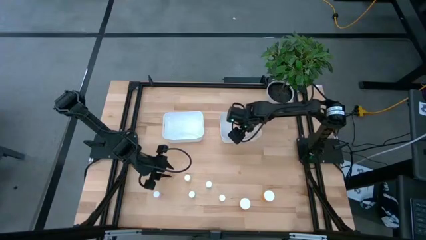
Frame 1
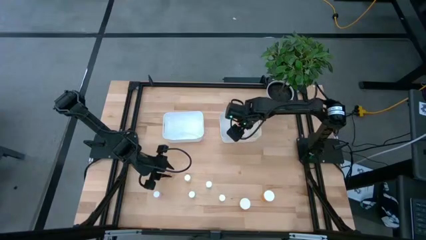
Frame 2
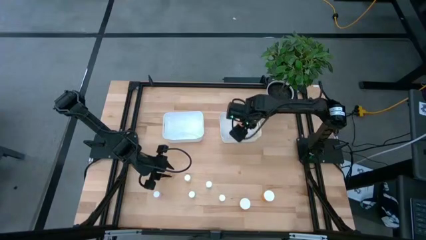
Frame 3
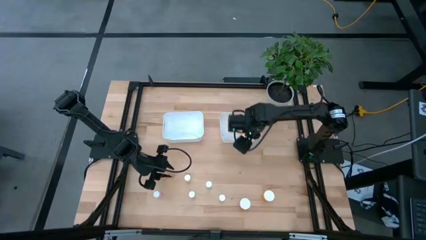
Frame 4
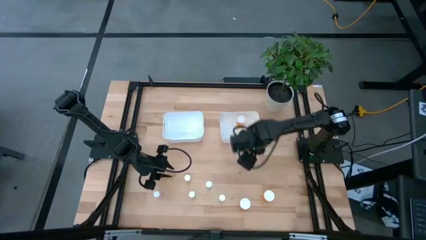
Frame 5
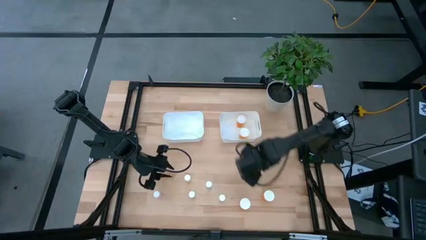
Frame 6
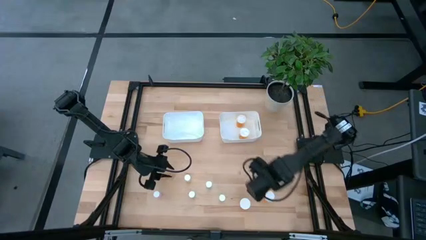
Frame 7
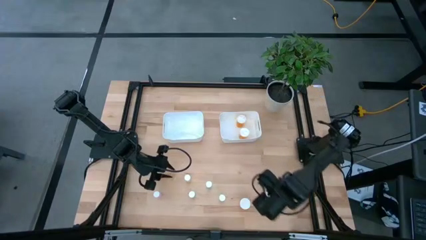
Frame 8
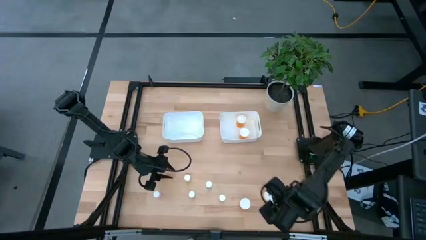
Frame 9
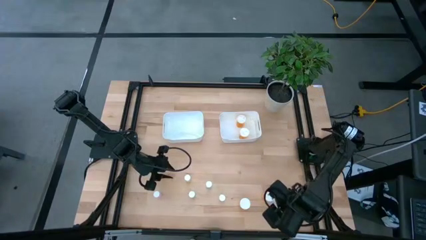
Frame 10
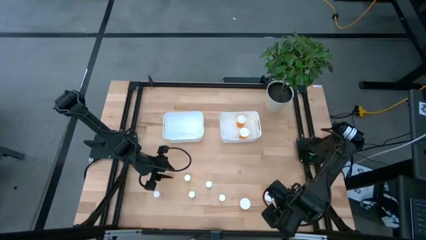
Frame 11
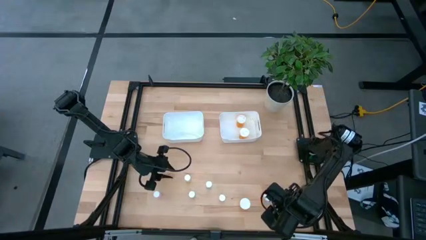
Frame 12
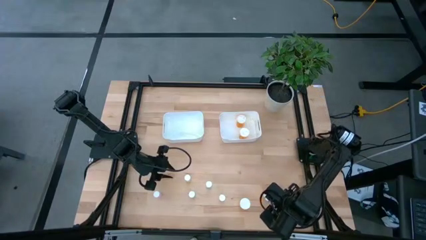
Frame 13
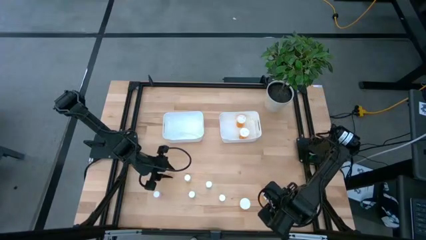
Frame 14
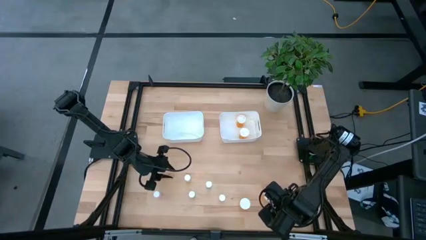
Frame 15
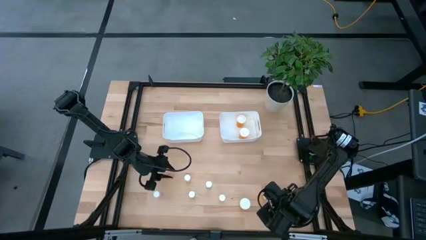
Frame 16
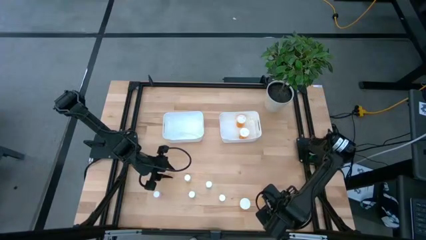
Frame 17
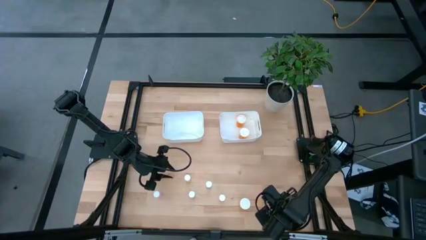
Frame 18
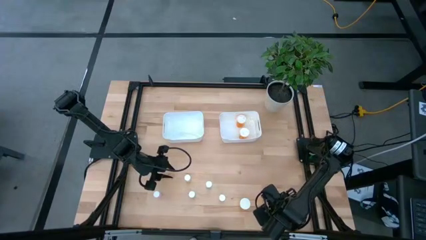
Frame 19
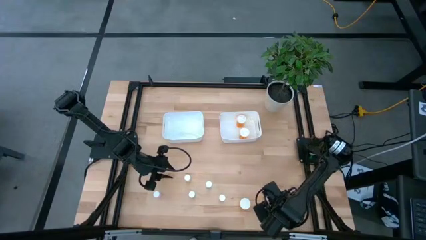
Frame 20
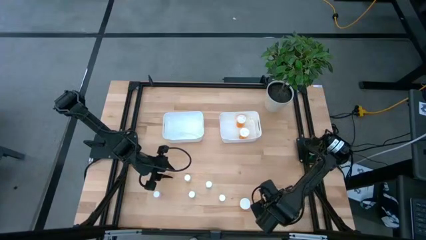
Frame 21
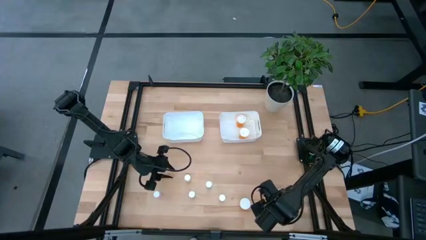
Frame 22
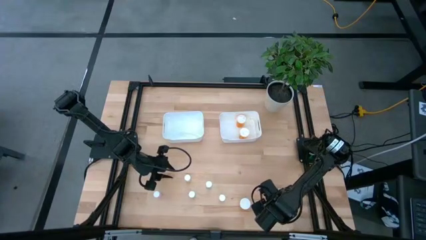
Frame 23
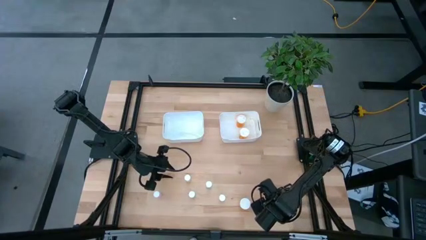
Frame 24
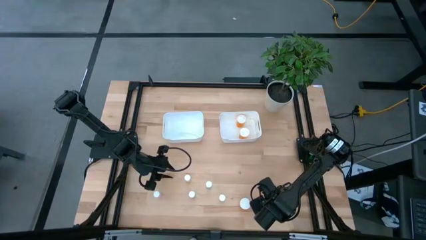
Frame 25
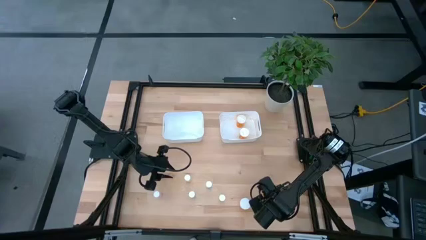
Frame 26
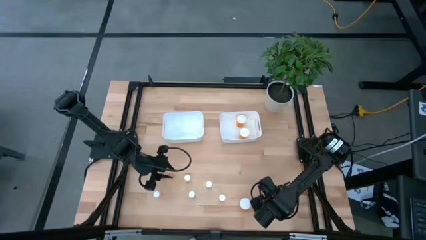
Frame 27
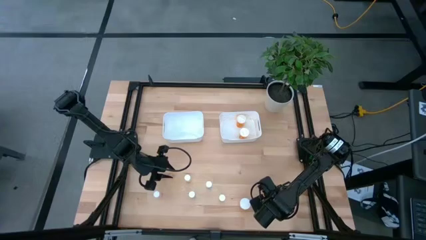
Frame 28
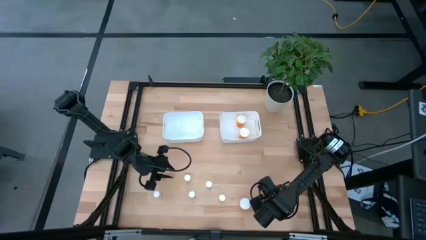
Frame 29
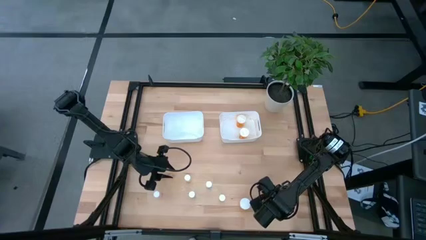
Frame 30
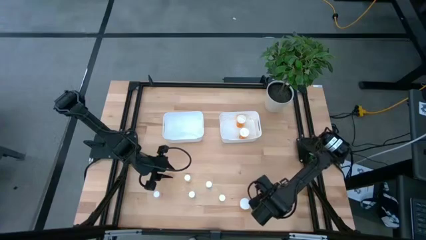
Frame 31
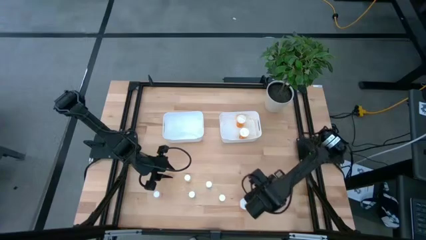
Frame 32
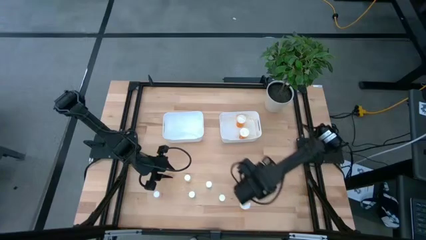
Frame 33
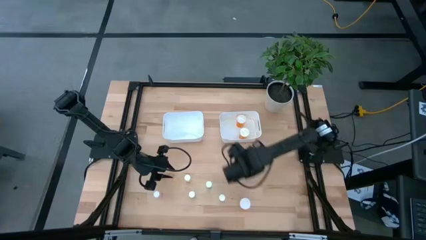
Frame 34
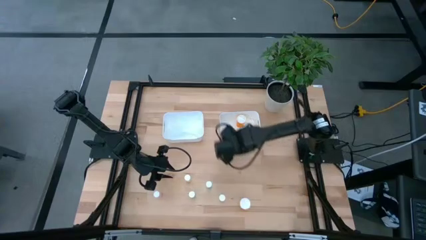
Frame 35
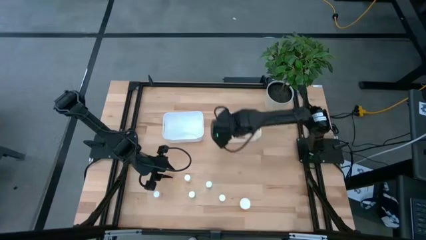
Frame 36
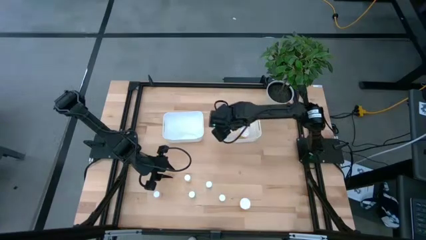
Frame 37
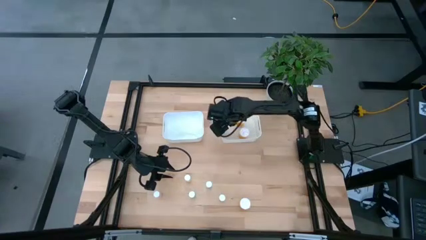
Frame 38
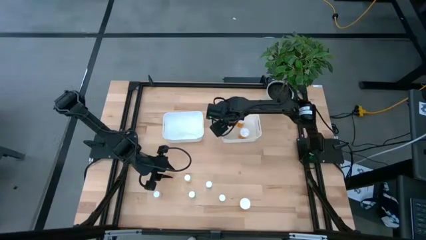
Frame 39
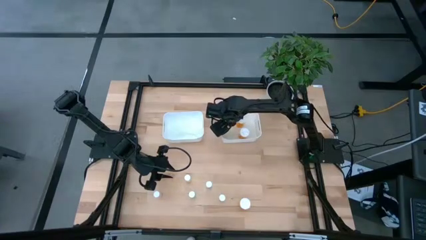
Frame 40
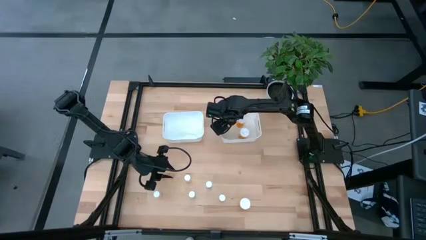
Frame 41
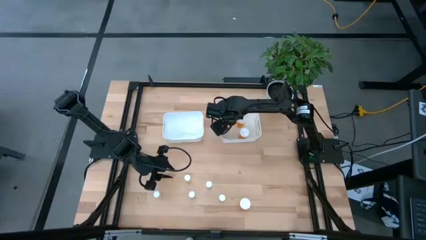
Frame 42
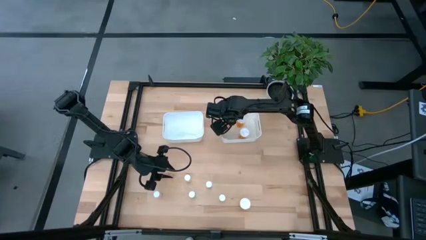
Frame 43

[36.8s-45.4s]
Task: Pick and place medicine bottles into bin by pill shape (circle, oval)
Put the right orange pill bottle into the right white bin

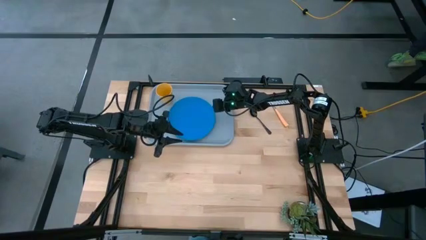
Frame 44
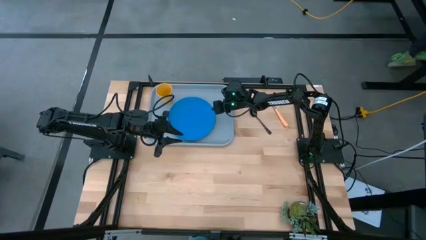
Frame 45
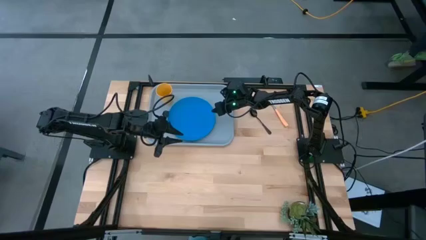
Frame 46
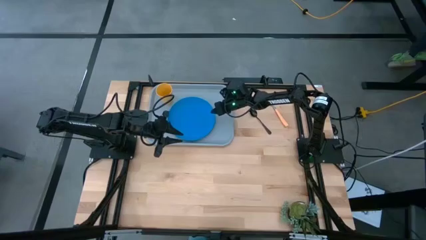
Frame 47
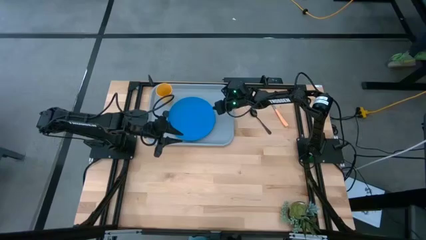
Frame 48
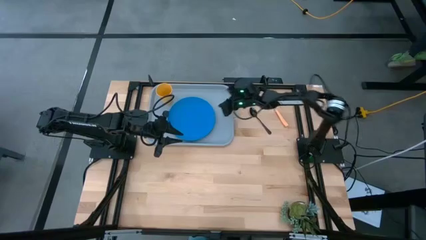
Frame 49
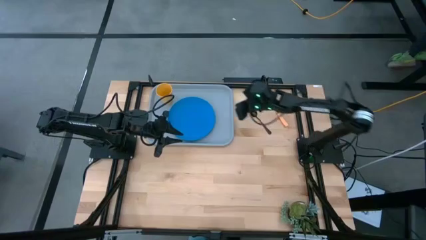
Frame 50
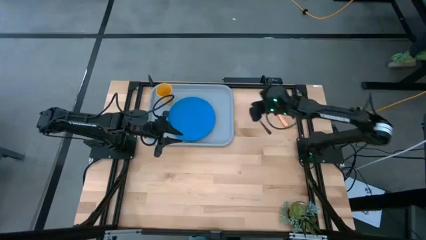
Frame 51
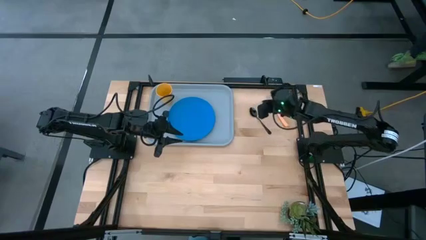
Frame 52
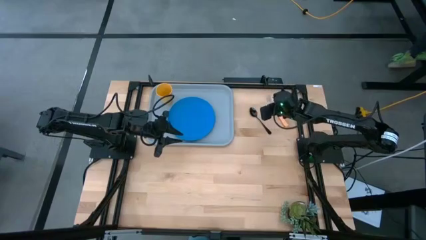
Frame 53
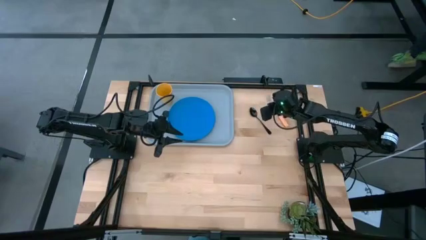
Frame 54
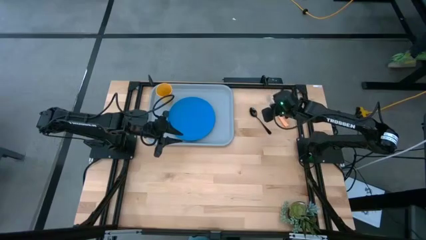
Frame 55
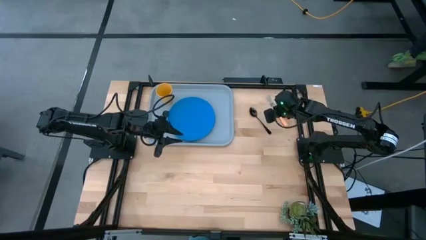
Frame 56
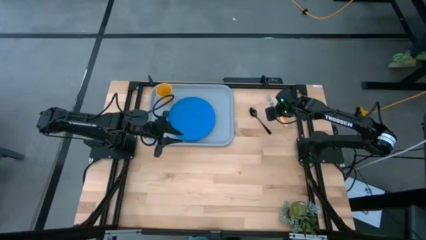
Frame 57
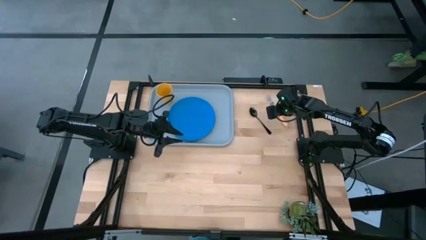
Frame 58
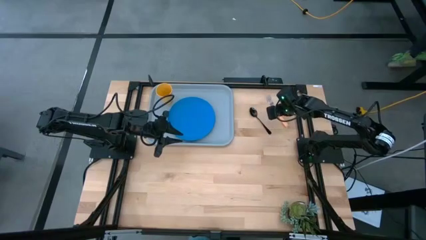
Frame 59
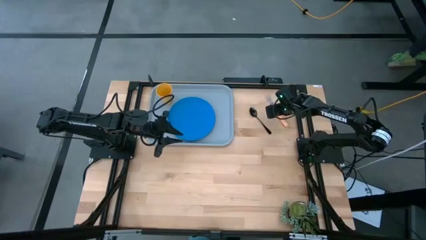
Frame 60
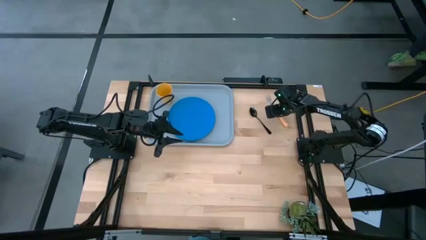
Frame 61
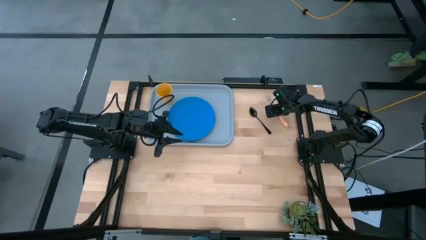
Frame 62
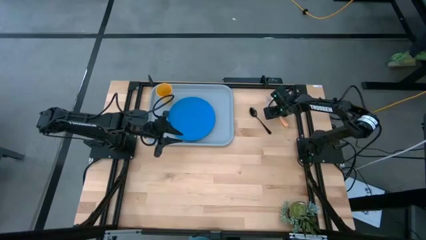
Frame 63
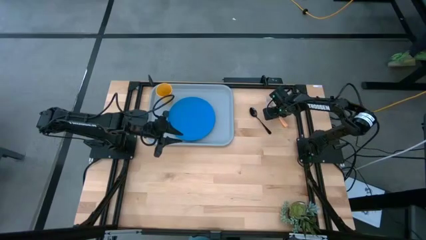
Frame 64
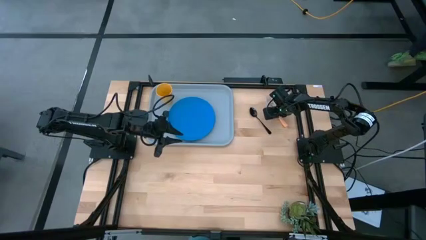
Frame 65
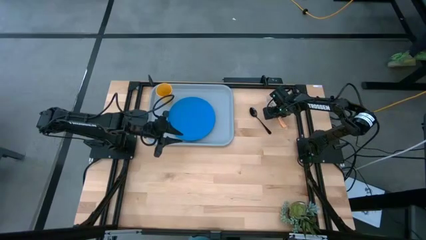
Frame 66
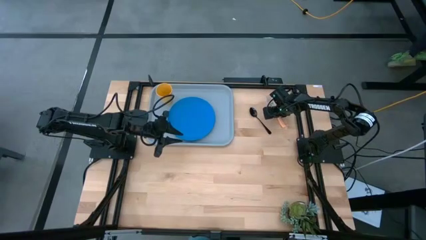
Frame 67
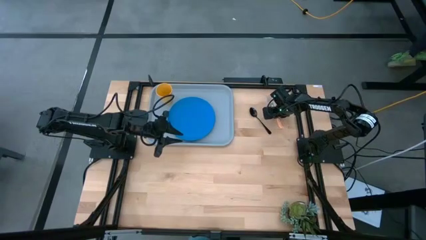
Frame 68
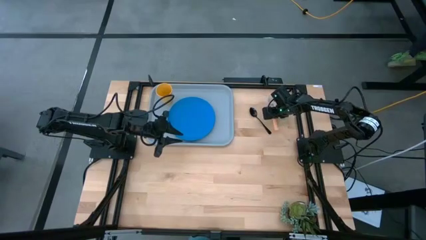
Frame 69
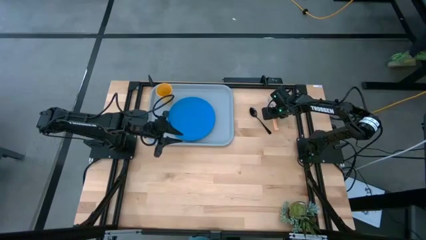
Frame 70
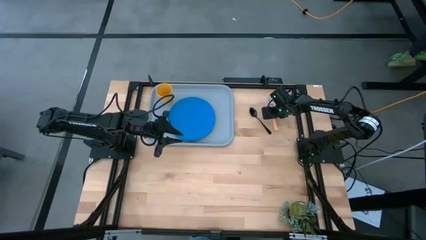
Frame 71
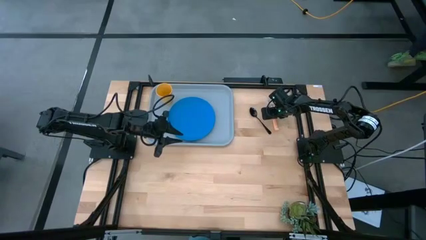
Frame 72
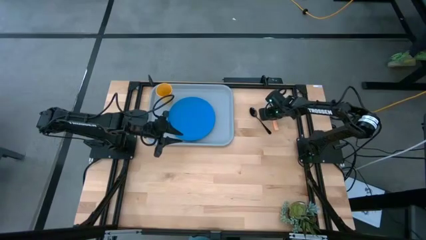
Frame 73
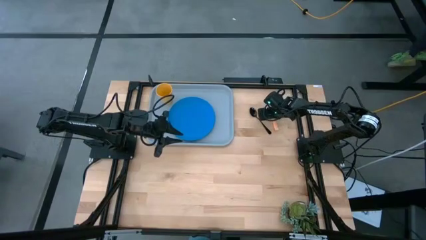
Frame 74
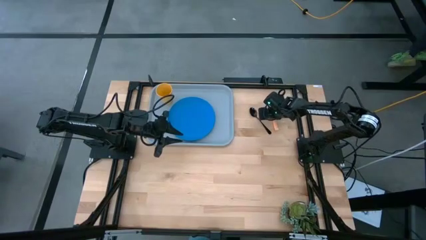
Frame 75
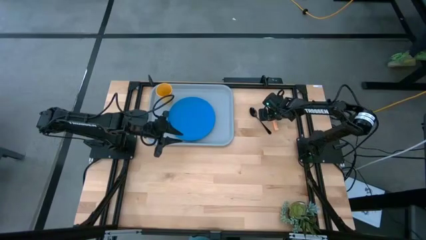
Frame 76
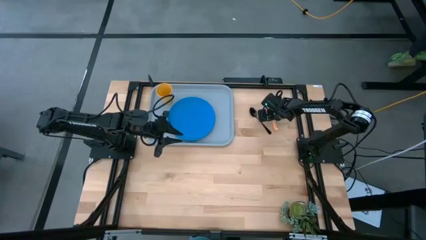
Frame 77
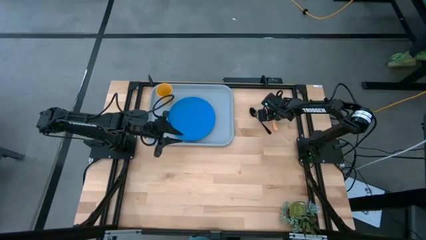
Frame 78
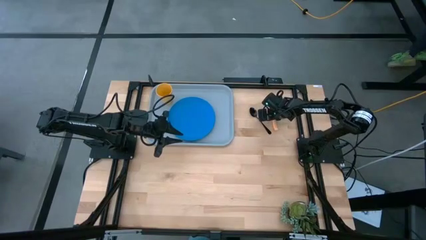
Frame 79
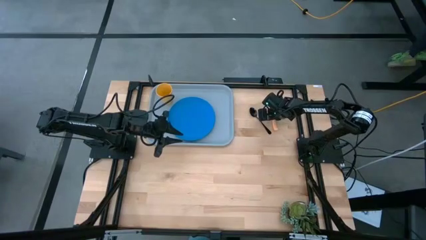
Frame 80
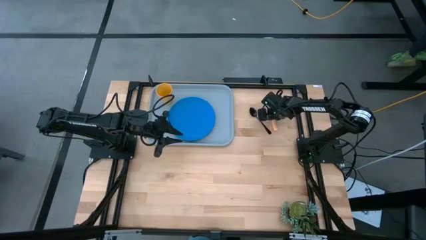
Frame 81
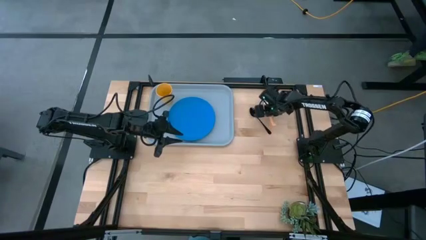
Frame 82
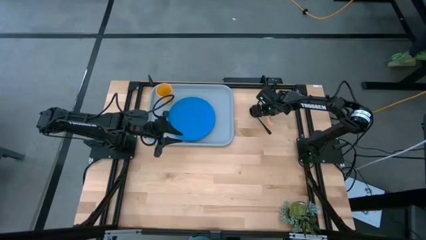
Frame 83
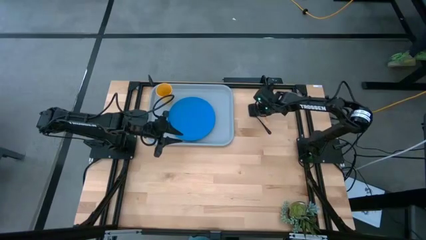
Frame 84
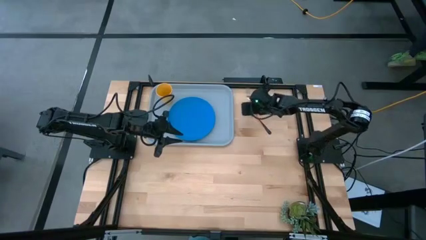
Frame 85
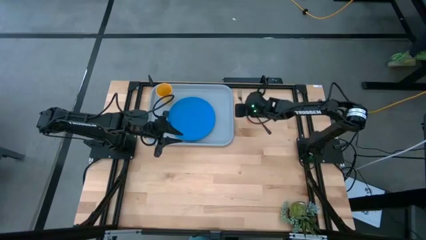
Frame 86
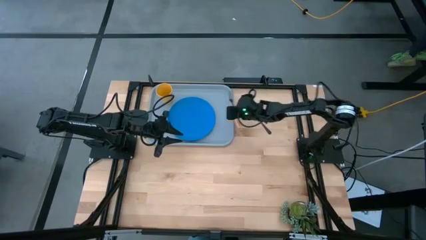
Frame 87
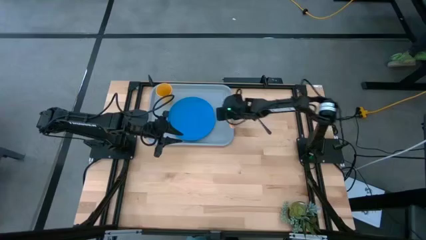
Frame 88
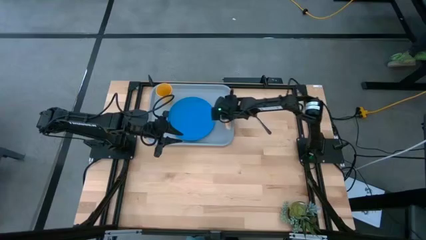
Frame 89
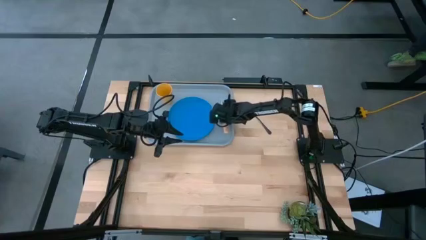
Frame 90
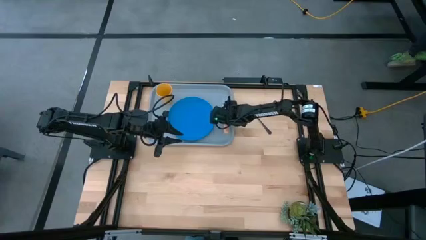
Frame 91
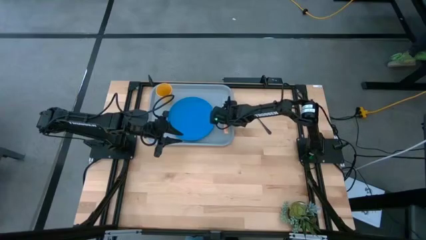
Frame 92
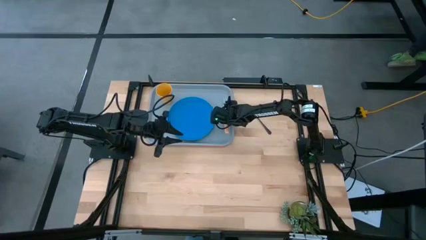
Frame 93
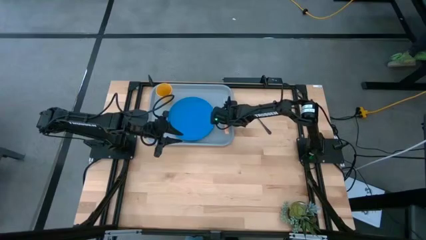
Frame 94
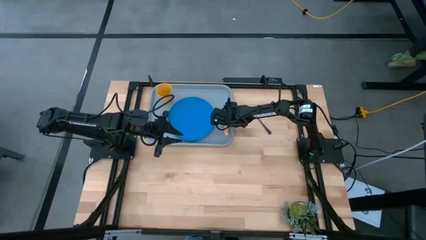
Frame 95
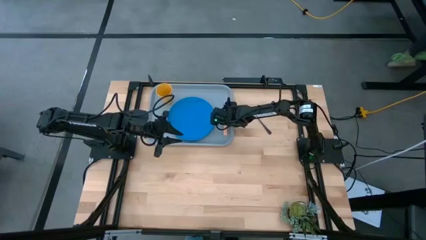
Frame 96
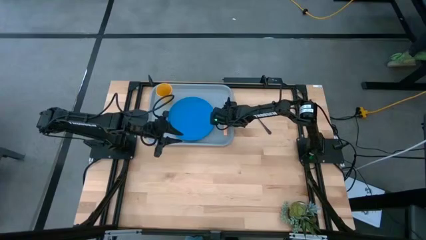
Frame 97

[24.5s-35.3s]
Task: Pick and place plate/cup/fork/spoon on tray
Put the orange fork on the gray tray to the right of the blue plate
